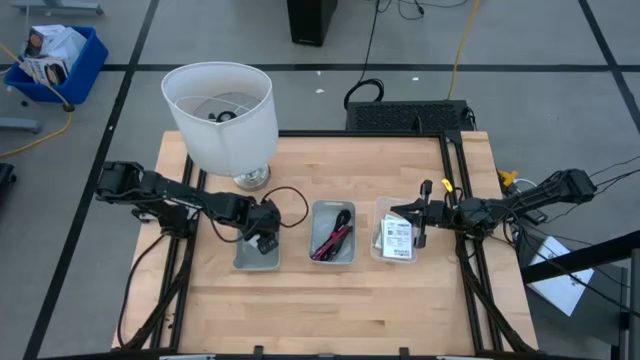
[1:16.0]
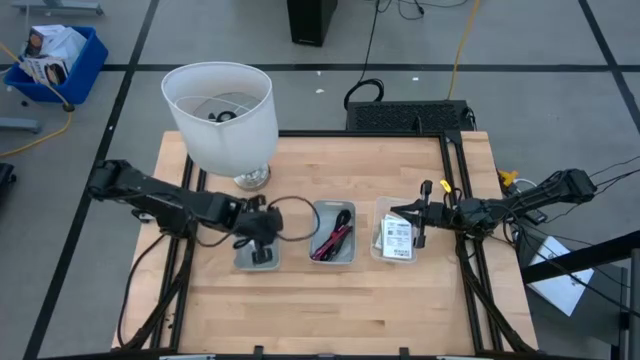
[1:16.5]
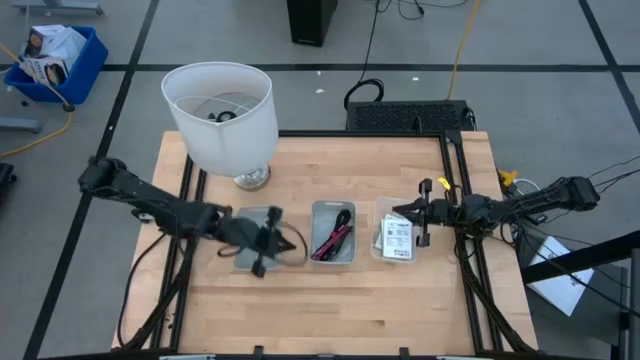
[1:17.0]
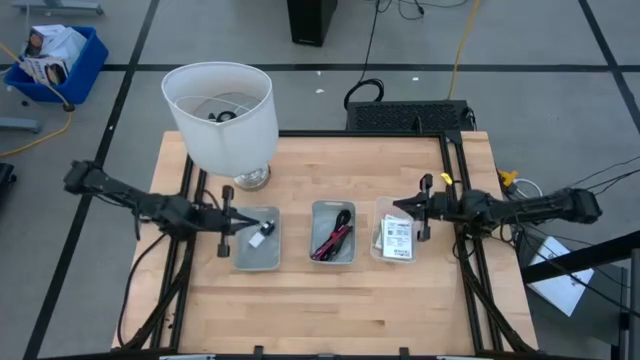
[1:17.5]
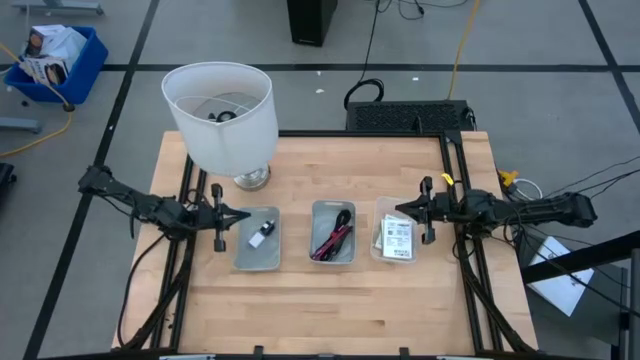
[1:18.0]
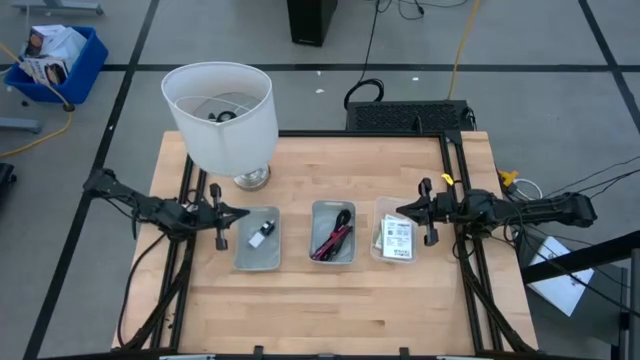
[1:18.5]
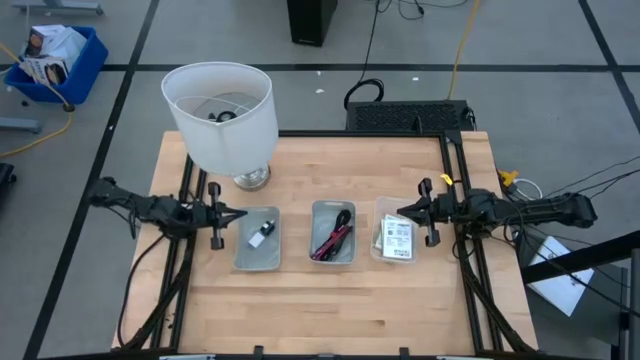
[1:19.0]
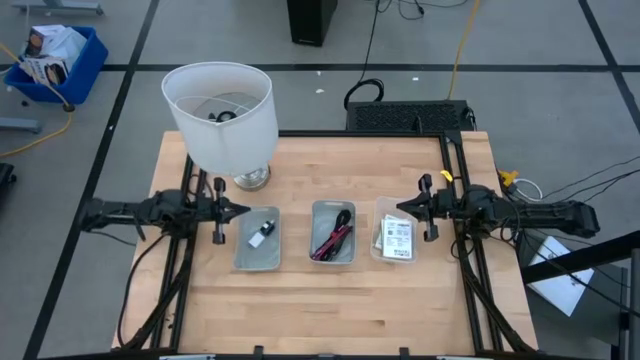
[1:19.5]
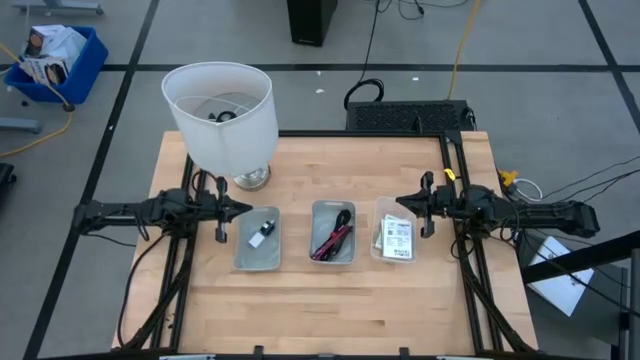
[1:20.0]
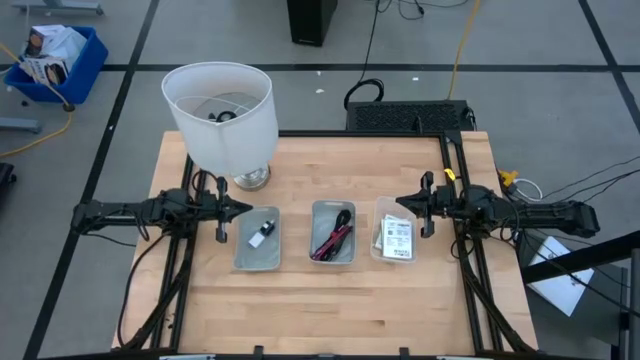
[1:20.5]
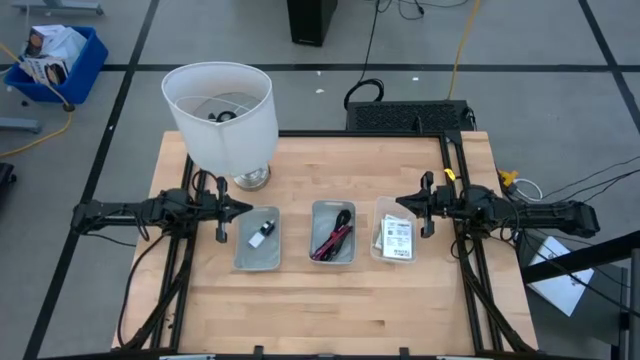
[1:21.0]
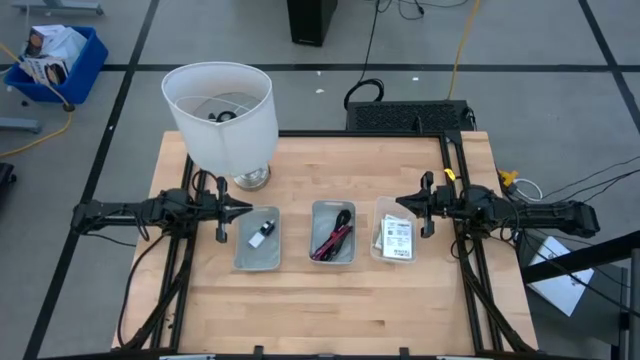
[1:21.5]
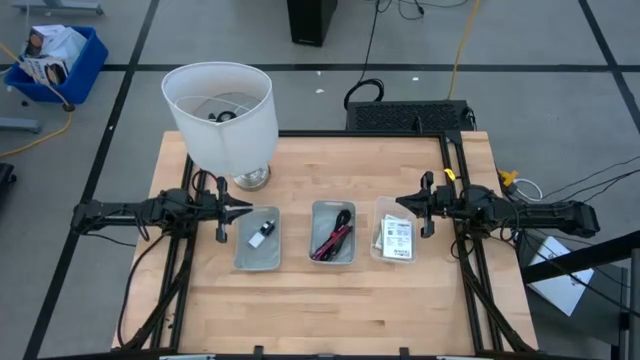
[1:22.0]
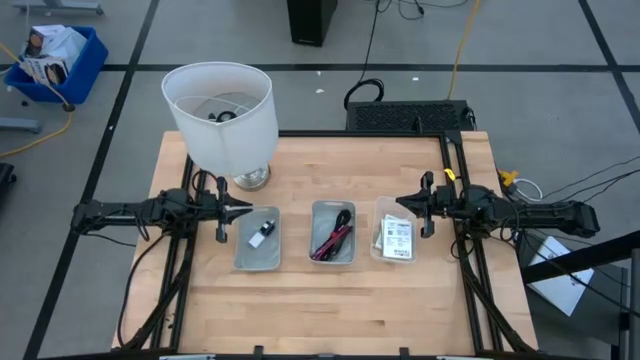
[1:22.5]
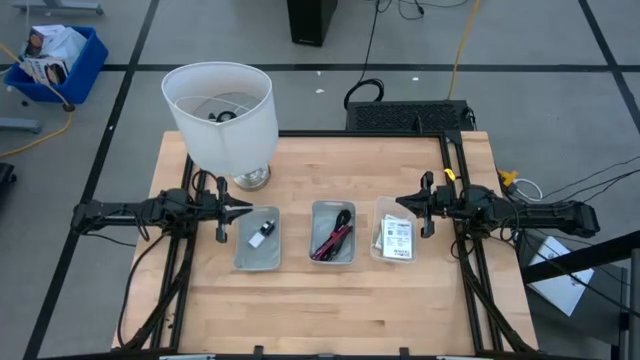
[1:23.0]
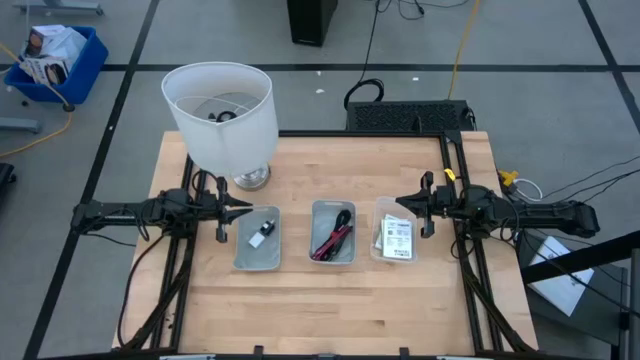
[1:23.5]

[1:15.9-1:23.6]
Task: Pick and place items into bin
Return to Home Position

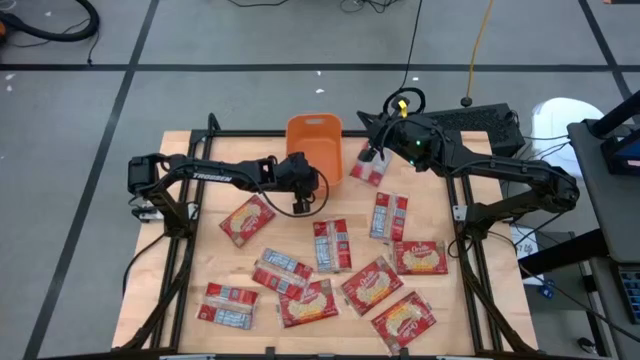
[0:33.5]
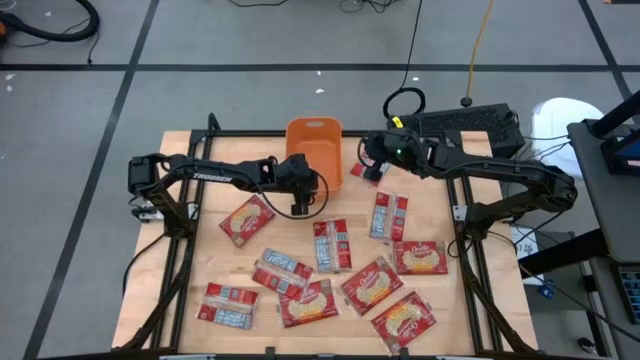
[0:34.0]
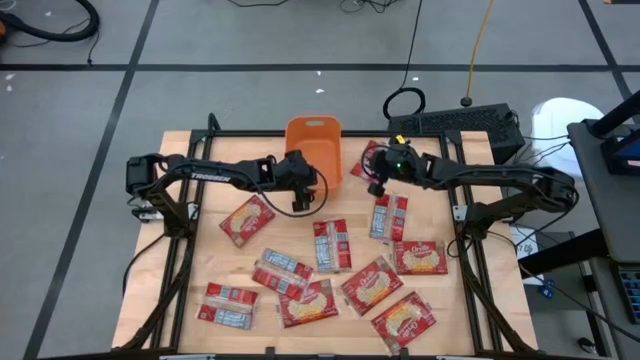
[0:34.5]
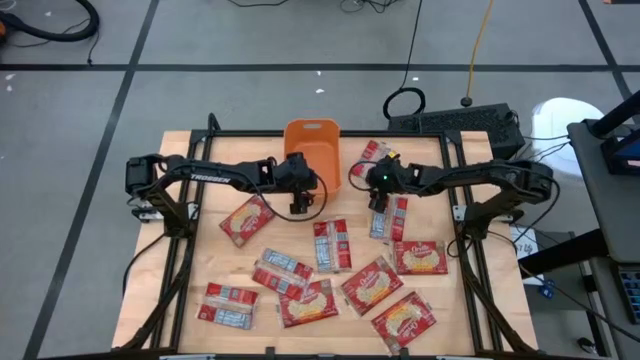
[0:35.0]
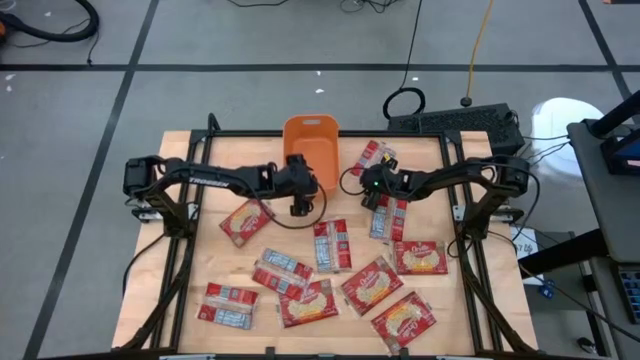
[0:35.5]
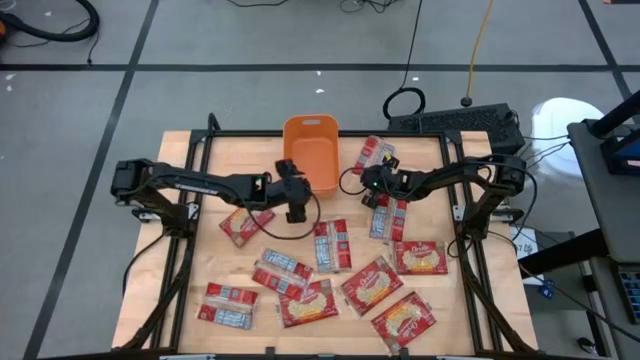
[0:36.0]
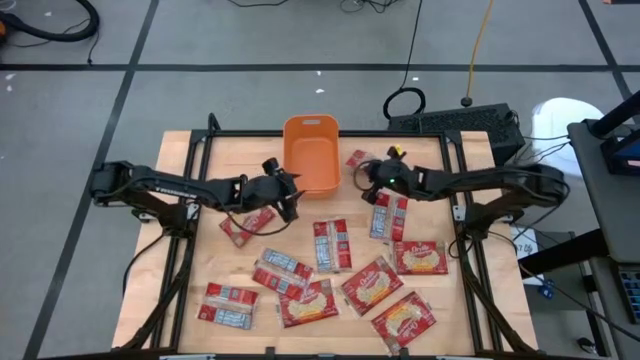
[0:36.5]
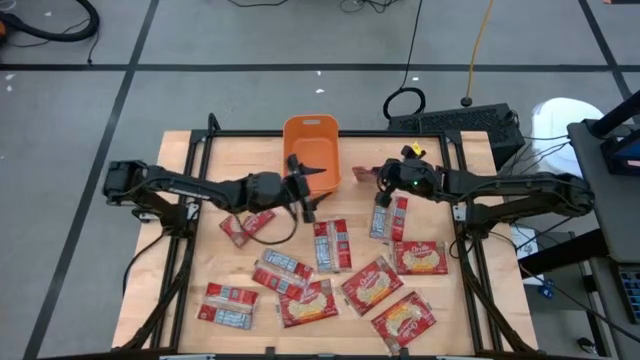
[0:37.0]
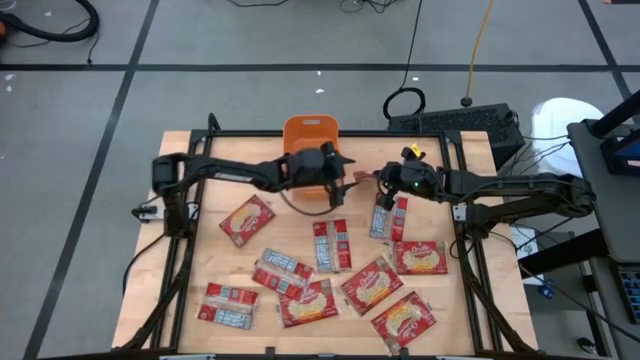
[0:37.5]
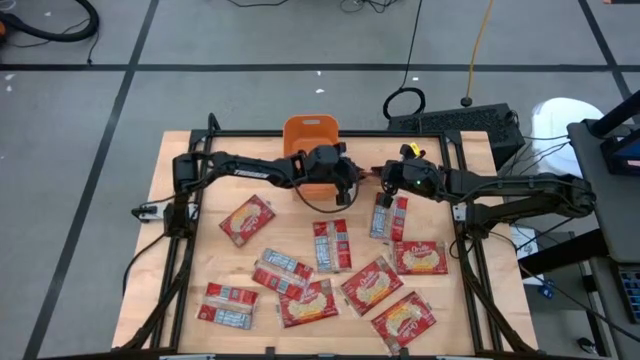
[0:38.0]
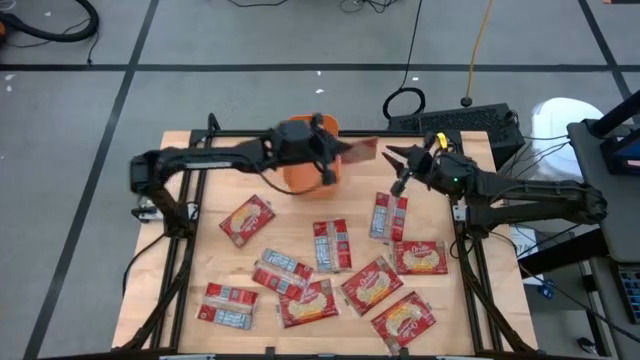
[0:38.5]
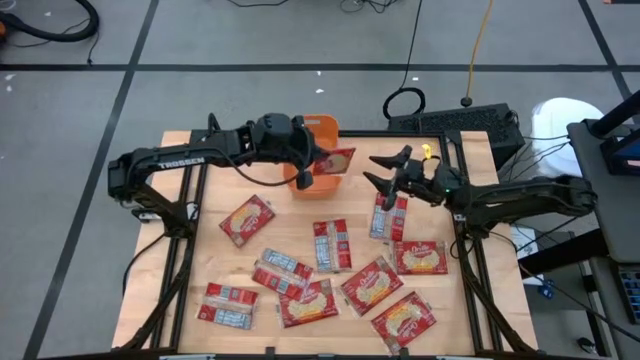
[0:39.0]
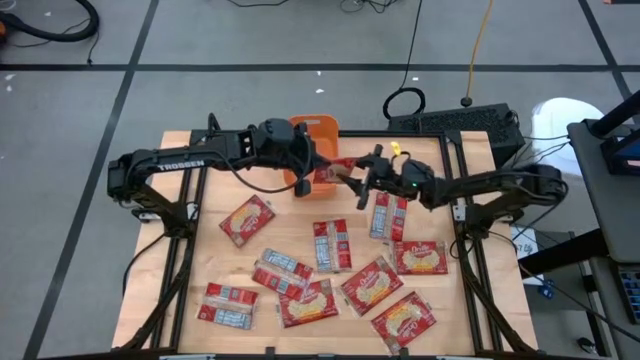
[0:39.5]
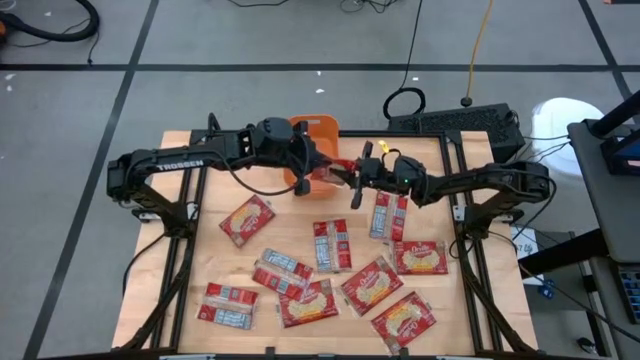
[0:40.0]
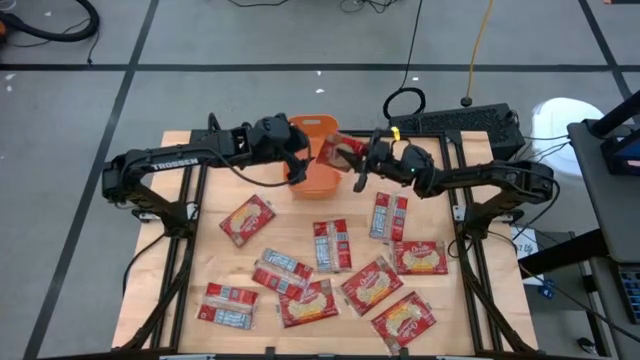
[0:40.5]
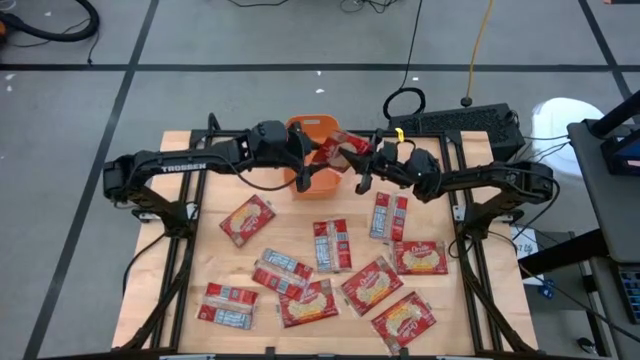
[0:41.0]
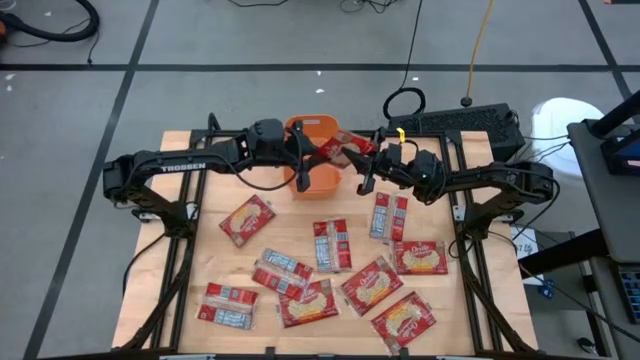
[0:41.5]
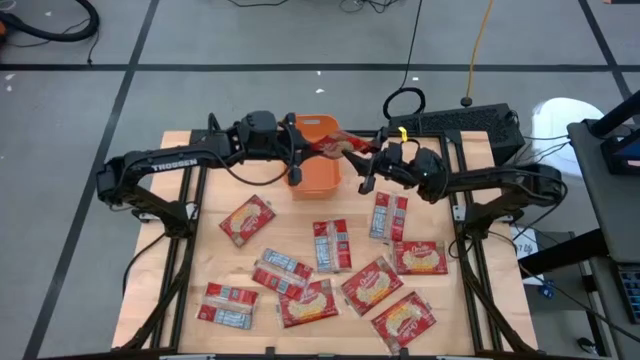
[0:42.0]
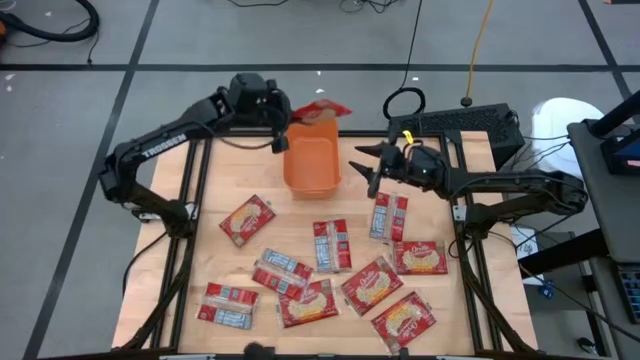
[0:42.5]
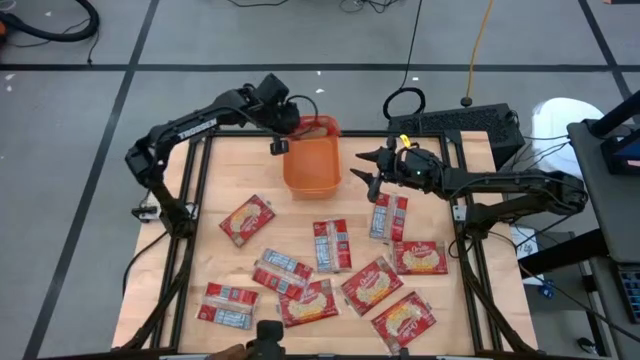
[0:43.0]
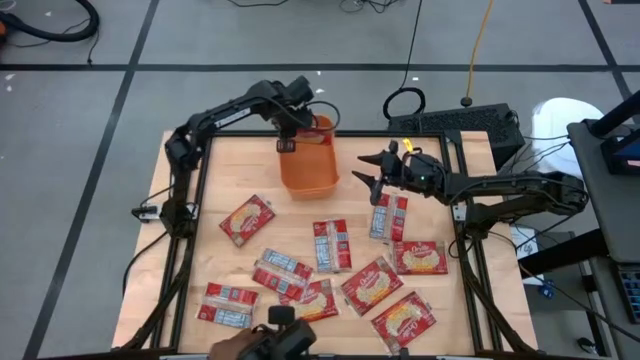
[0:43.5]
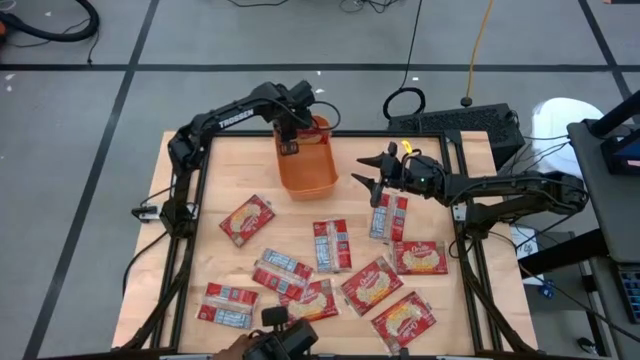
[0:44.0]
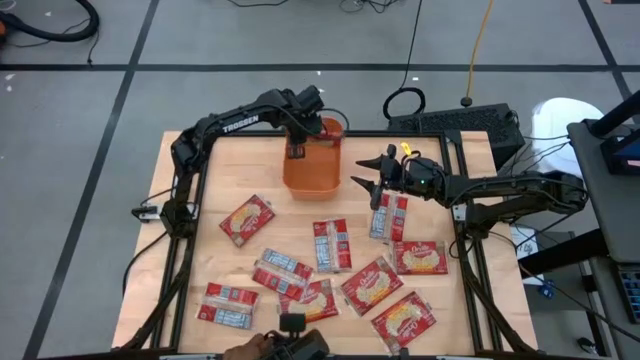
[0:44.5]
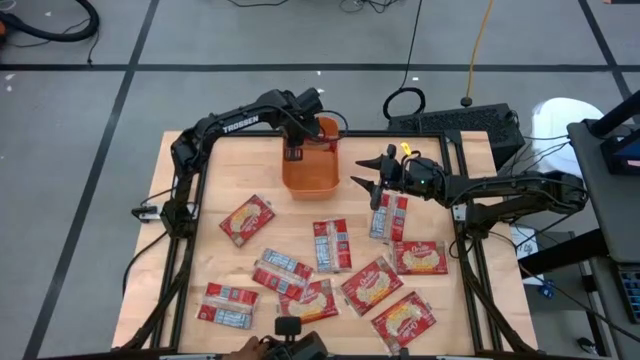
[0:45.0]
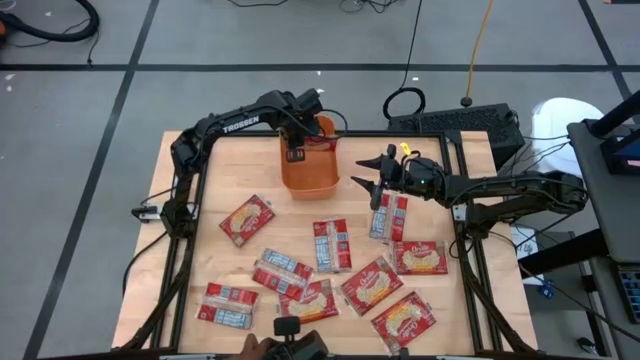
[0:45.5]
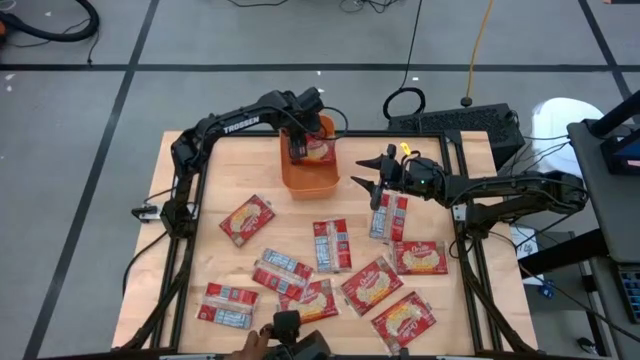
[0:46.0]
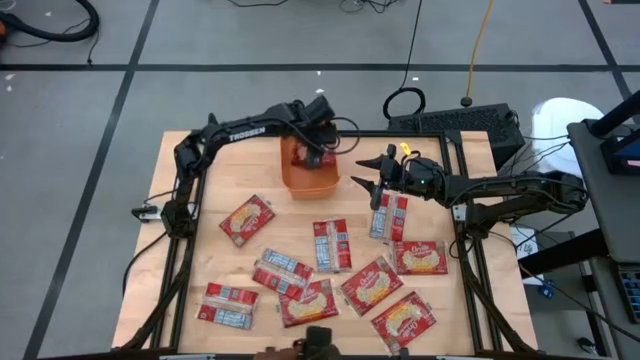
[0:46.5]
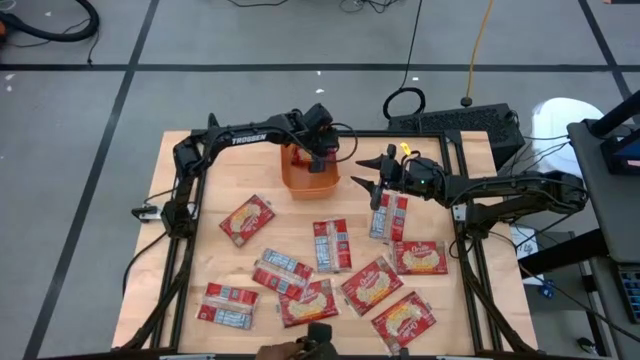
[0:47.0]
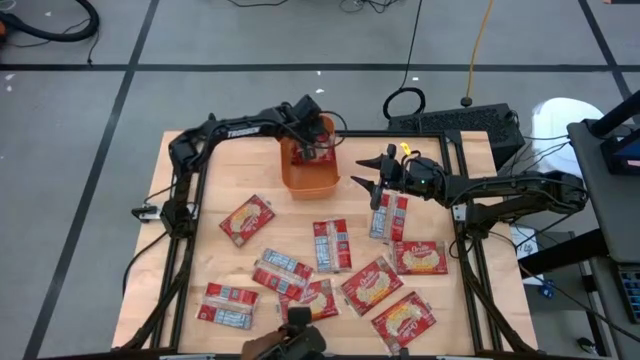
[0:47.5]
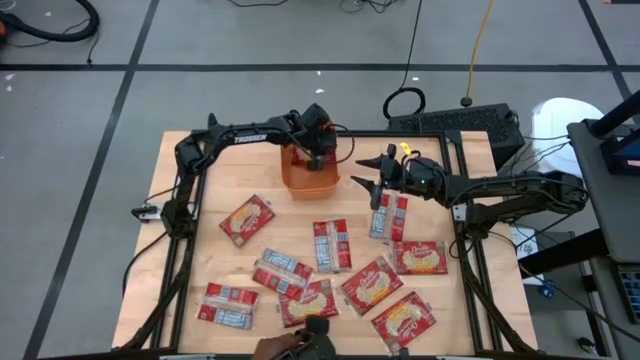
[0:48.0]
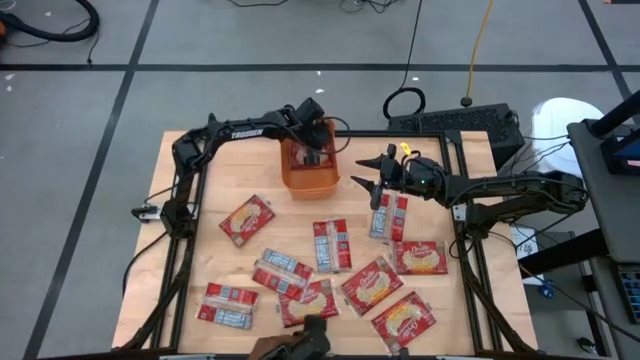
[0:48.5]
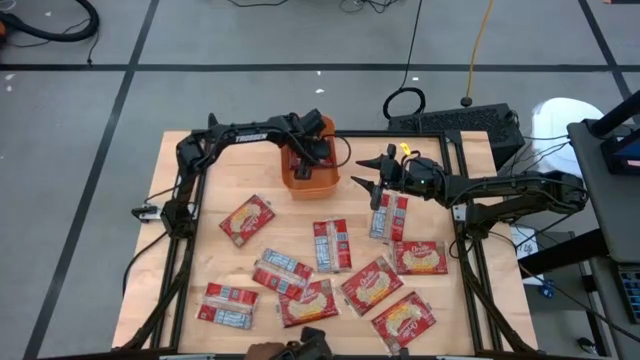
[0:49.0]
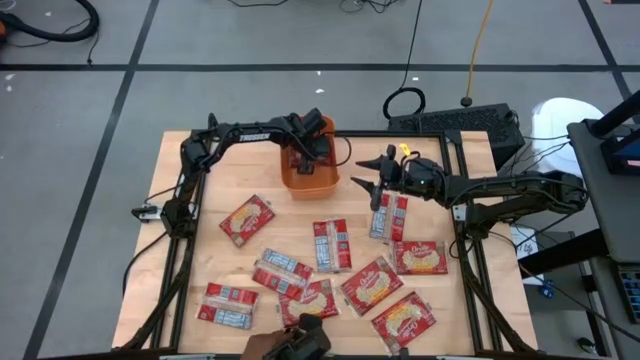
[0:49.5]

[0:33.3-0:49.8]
Task: Sort popcorn bags into baskets
Put the red popcorn bag into the orange bin
